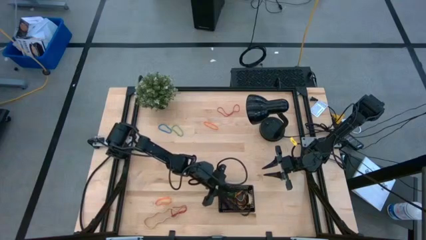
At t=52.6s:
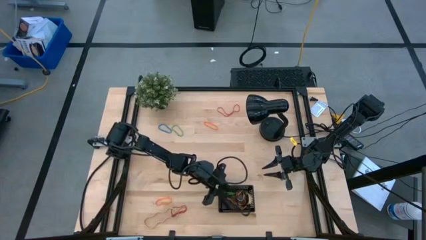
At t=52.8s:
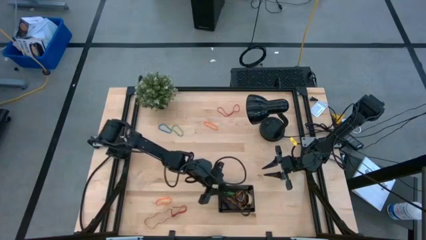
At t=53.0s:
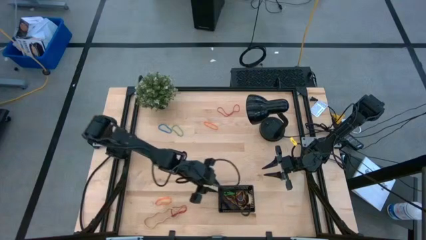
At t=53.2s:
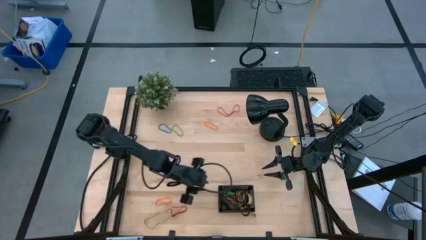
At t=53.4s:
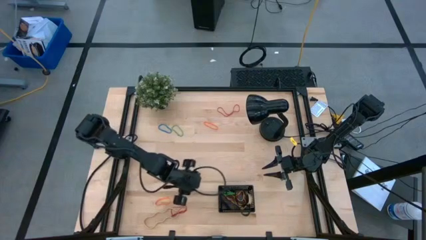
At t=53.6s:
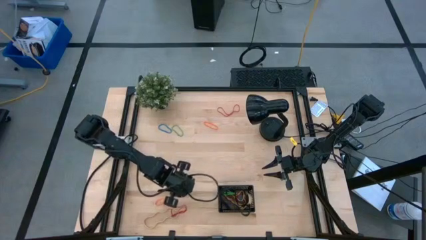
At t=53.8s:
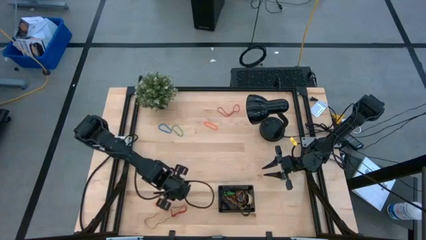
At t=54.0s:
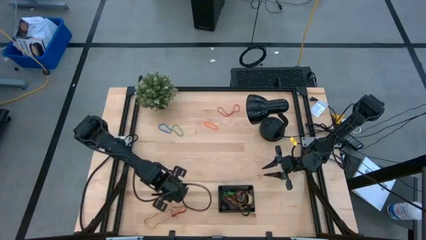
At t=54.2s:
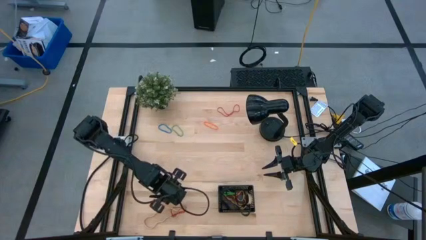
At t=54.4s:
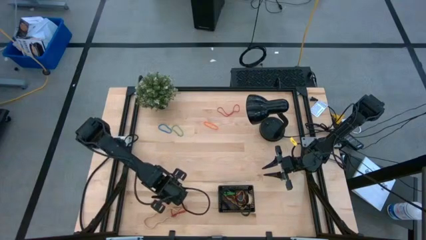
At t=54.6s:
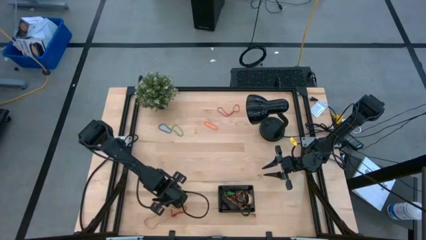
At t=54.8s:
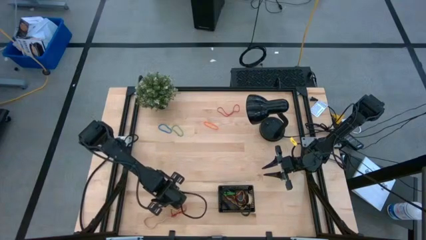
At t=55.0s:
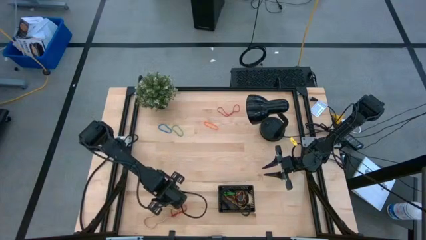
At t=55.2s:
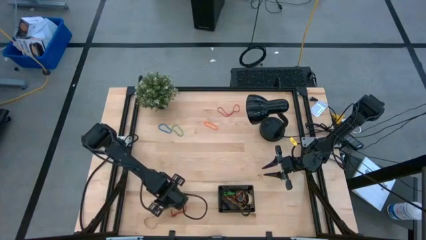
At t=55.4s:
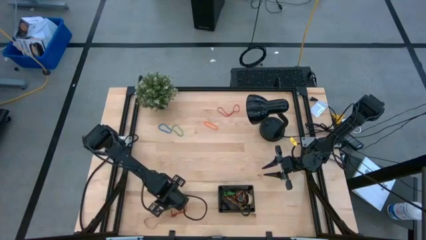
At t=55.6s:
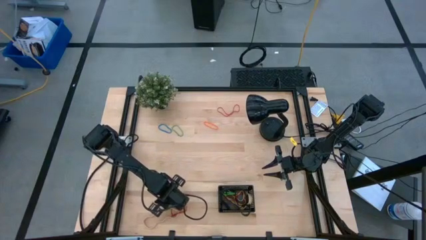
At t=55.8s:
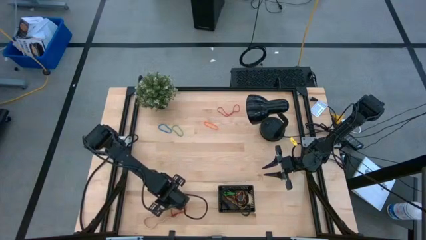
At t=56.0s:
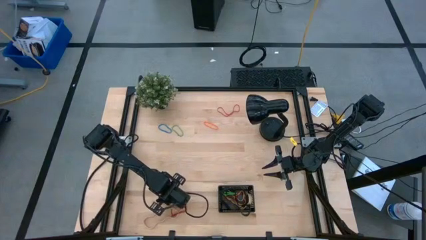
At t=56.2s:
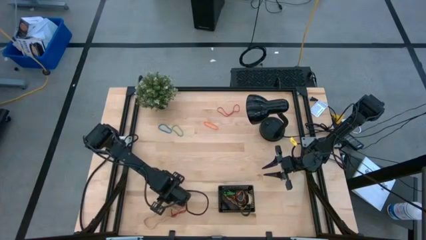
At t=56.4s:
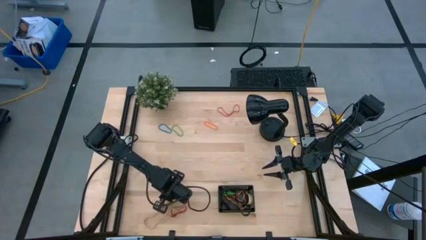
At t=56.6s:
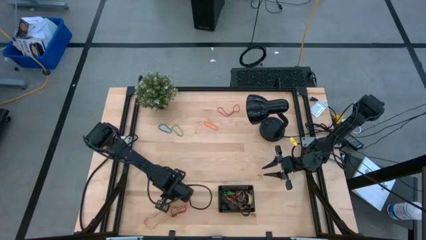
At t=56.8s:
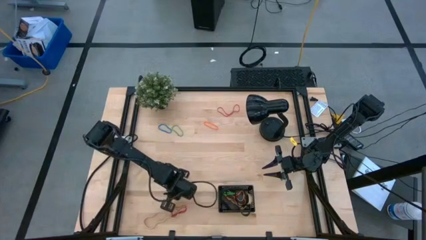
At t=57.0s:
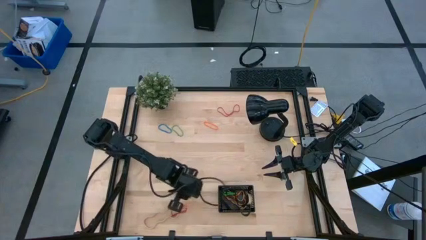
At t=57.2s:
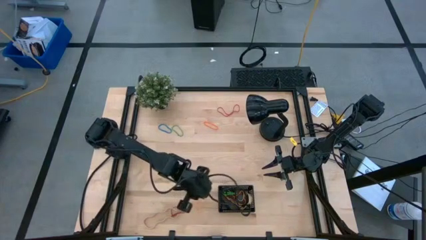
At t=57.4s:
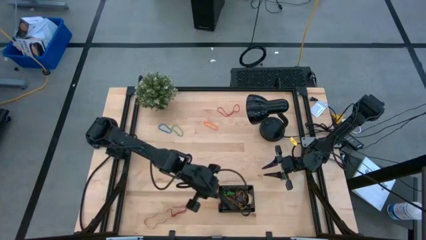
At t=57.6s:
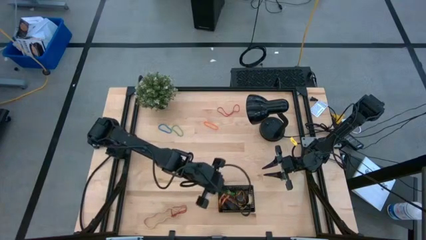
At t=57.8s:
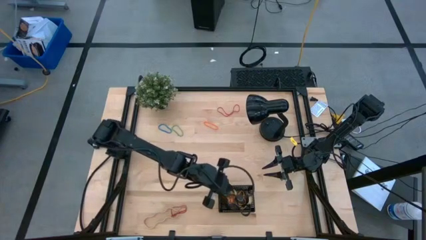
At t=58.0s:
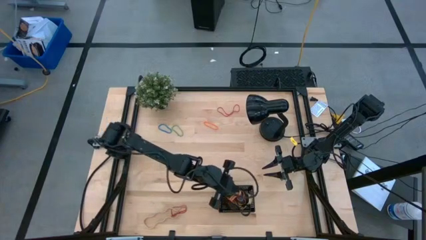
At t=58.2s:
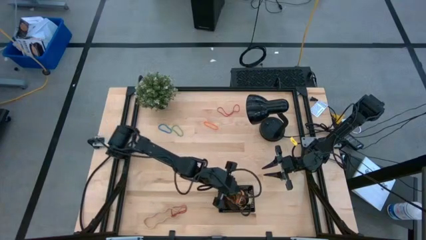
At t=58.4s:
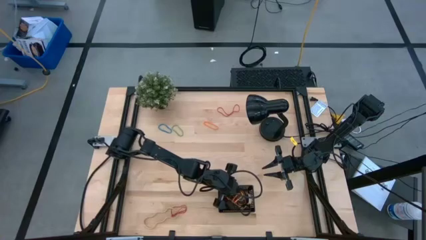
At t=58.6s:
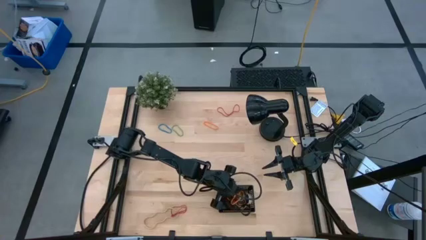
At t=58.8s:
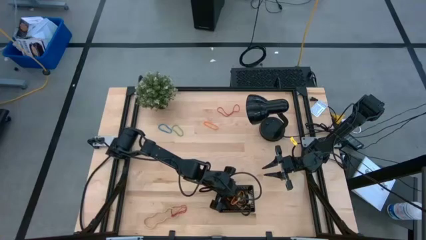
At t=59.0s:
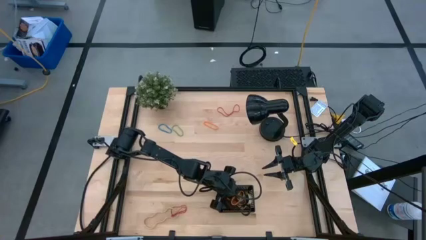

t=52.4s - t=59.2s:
Task: Pick and place rubber bands into bin
Put the bottom orange rubber band into the black bin

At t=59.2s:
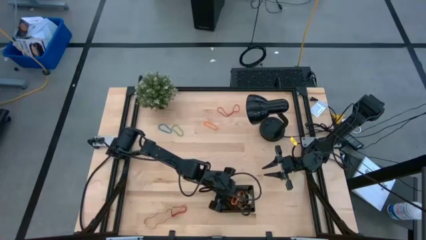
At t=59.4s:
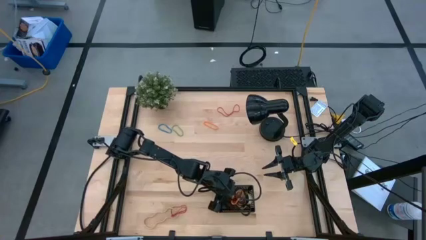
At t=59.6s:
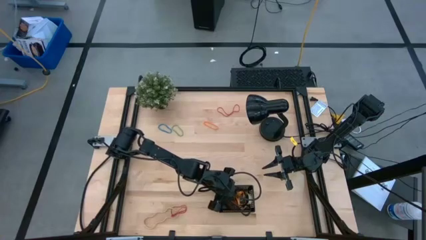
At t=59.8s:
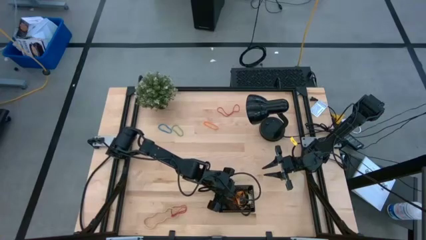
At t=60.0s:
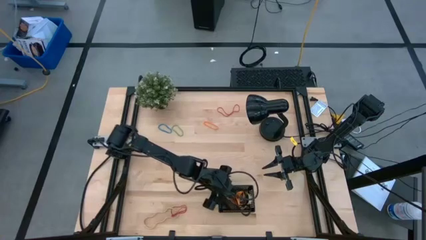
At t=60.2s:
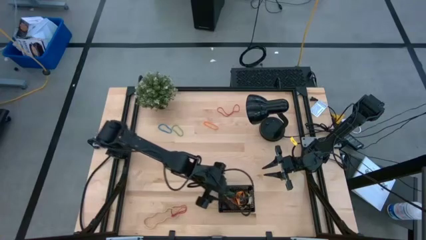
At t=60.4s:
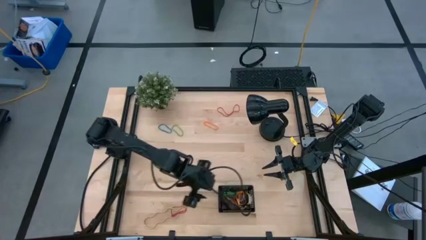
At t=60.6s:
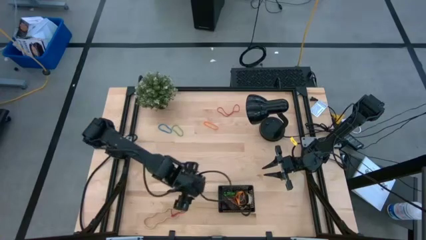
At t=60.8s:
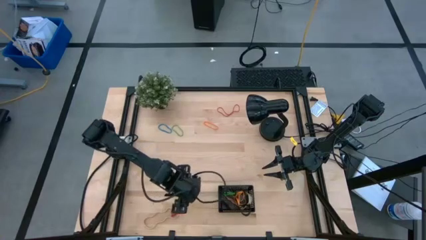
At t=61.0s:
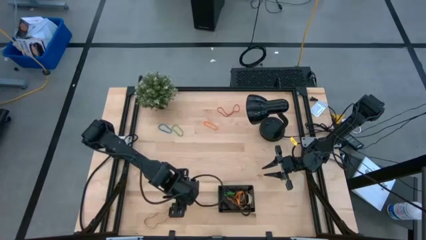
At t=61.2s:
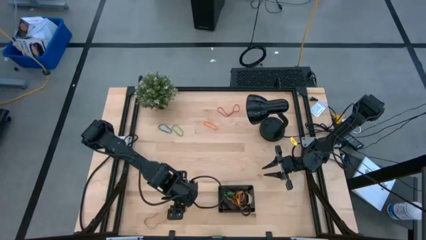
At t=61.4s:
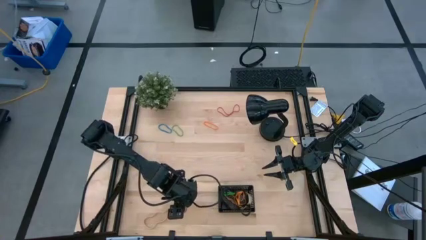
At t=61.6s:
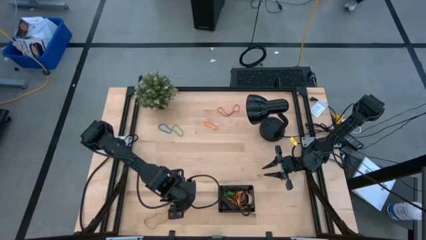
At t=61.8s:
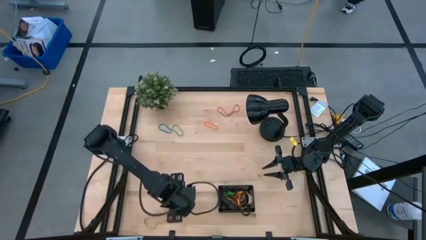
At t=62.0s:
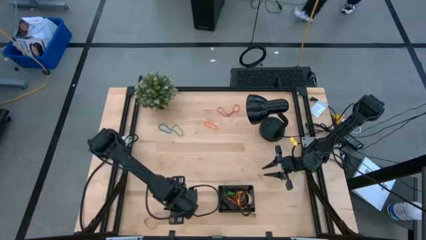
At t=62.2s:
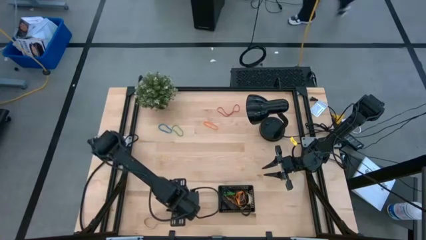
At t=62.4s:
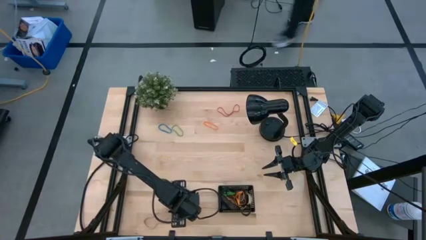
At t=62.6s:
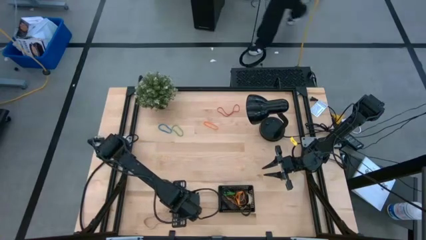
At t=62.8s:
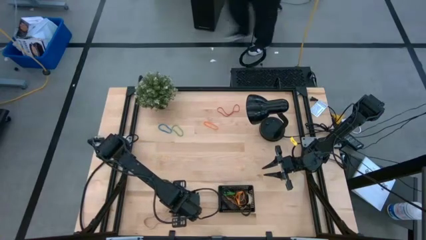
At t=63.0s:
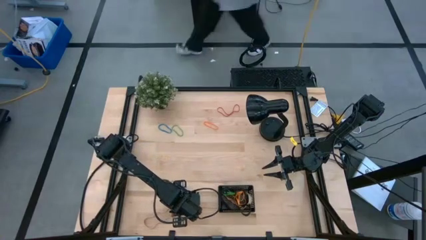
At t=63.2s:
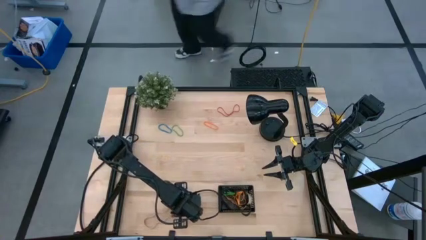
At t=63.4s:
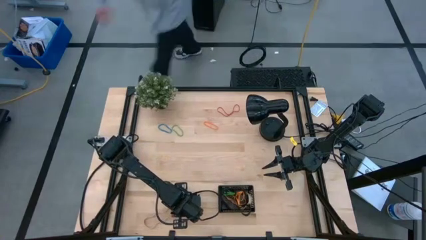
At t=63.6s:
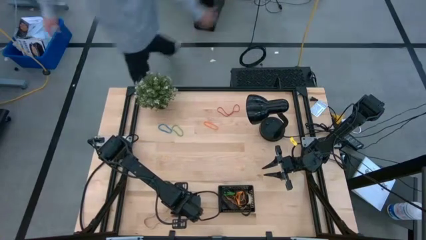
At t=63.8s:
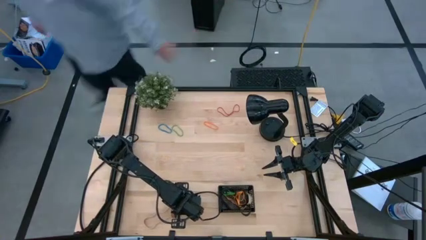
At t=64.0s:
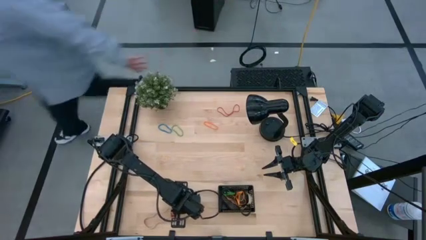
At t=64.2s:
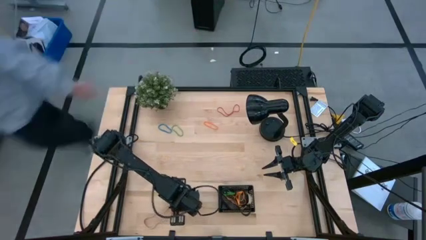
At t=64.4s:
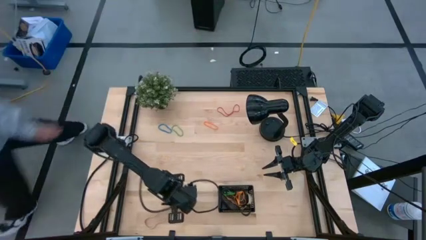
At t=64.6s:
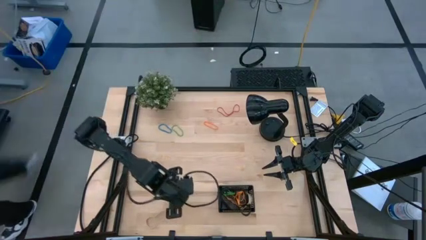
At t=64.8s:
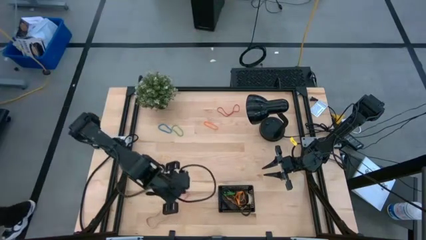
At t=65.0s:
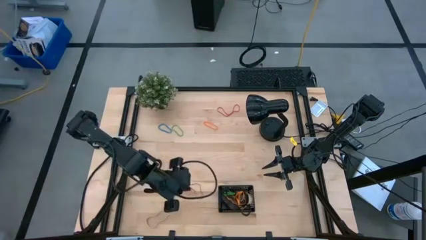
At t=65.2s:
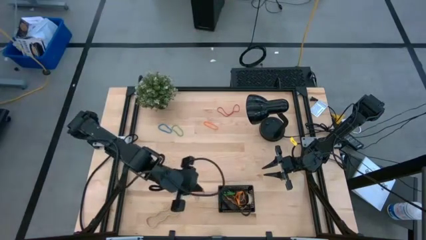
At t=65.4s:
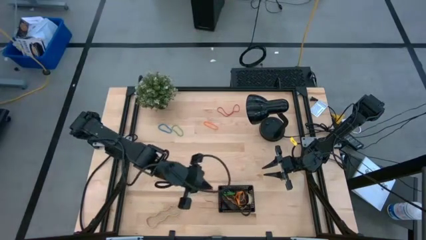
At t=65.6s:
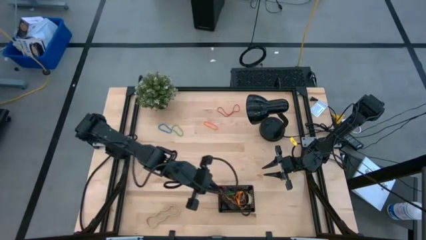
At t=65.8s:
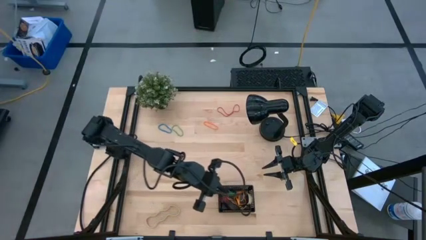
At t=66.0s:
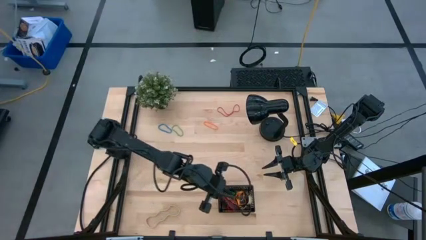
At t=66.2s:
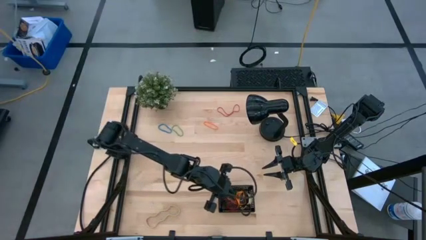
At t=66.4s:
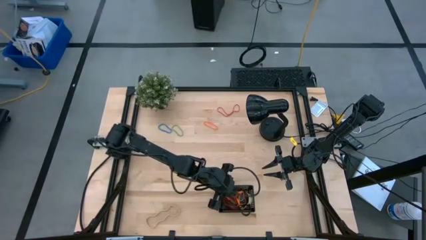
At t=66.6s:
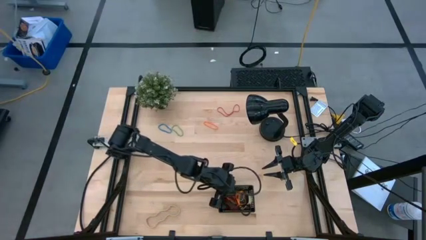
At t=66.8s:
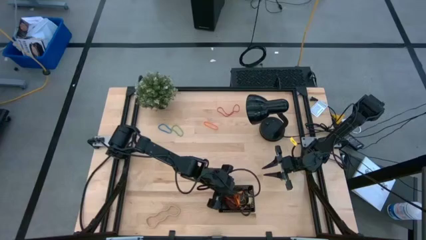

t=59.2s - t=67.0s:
Put the bottom red rubber band into the black bin

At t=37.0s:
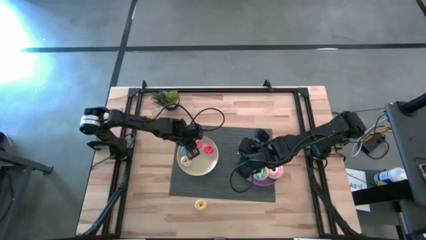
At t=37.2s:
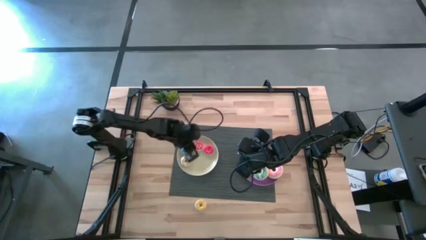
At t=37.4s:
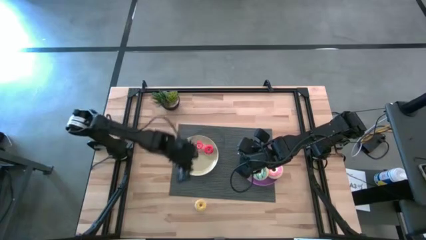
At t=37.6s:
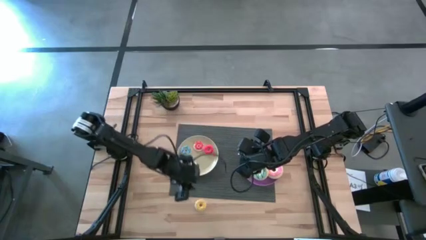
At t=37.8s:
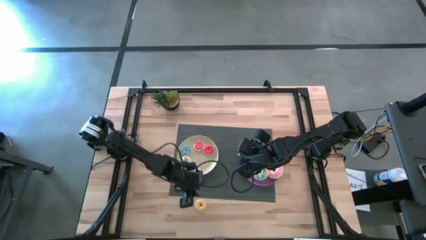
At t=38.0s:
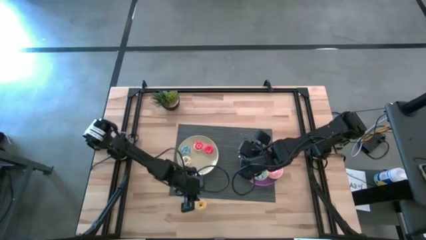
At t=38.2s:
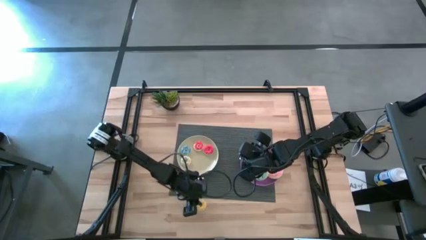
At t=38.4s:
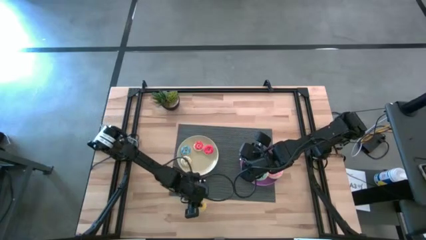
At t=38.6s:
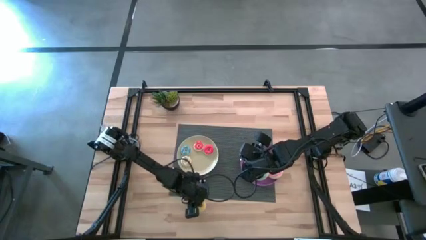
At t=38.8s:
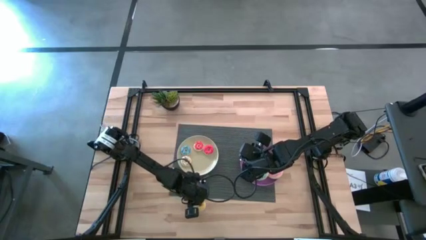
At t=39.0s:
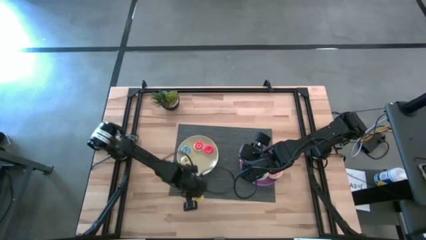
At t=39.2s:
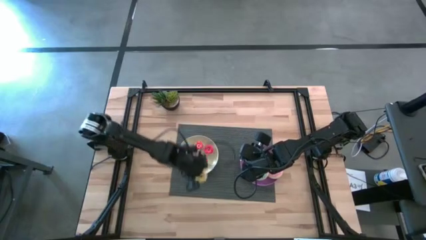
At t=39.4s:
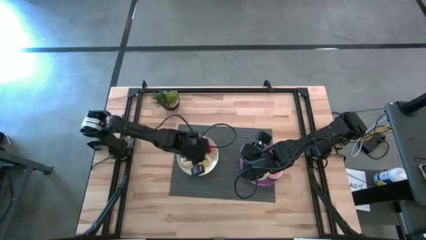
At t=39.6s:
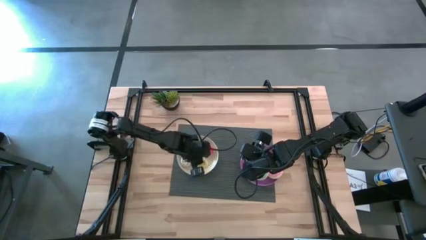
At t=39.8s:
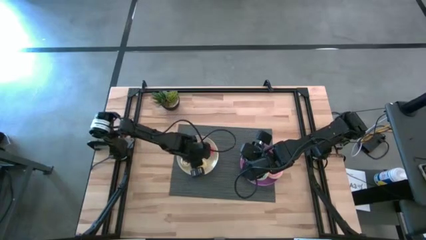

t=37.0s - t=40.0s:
Task: Pick & Place donuts
Put the small yellow donut on the white plate
